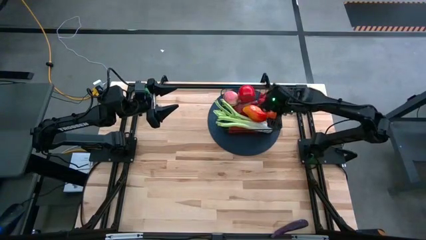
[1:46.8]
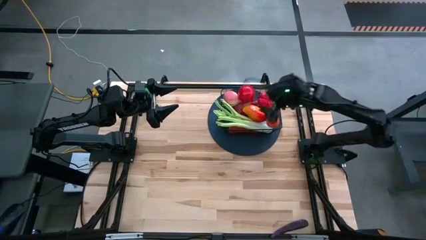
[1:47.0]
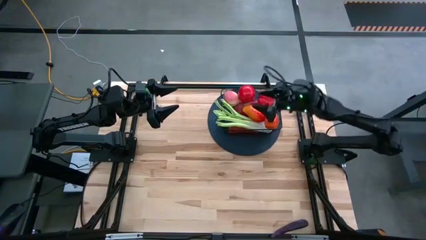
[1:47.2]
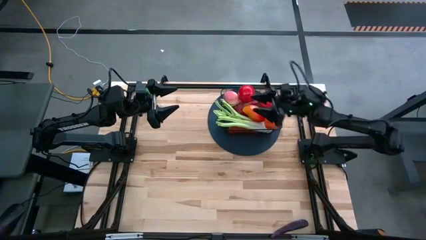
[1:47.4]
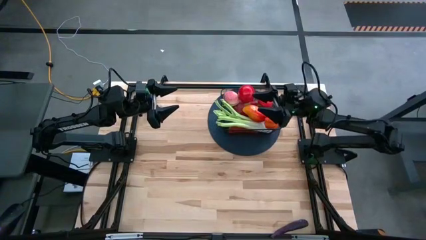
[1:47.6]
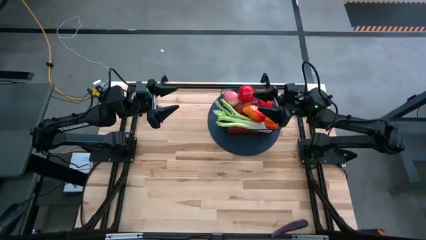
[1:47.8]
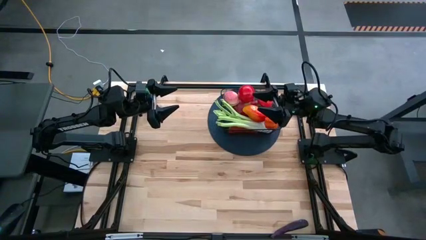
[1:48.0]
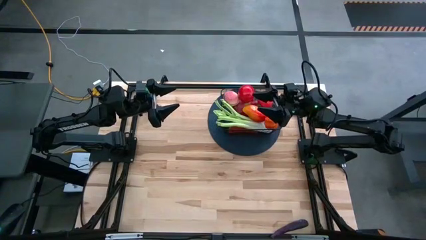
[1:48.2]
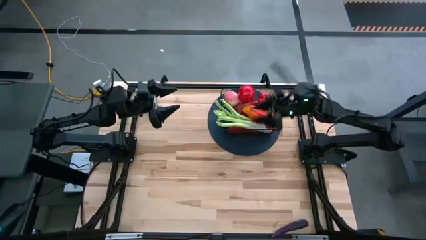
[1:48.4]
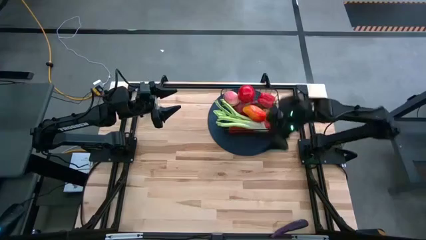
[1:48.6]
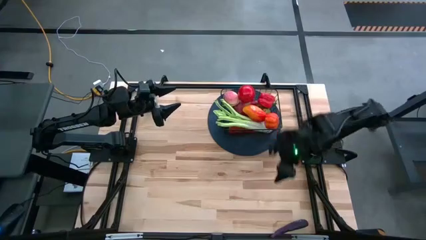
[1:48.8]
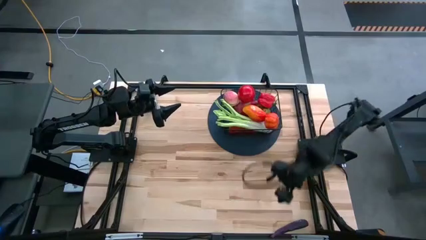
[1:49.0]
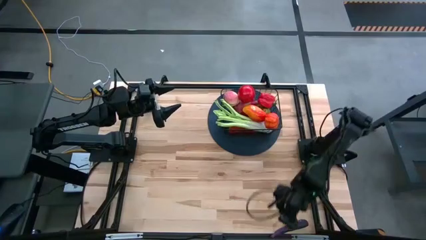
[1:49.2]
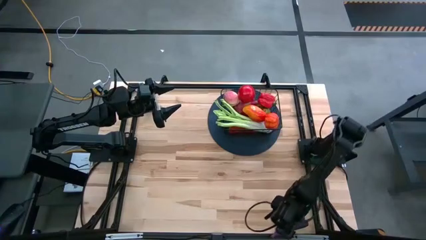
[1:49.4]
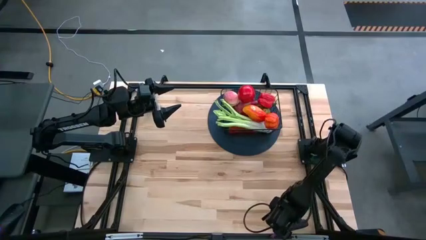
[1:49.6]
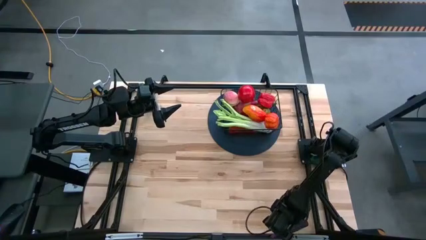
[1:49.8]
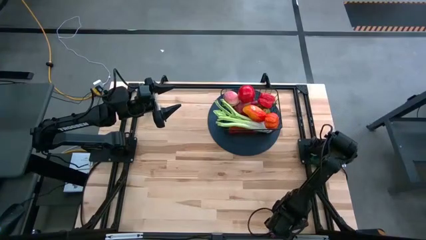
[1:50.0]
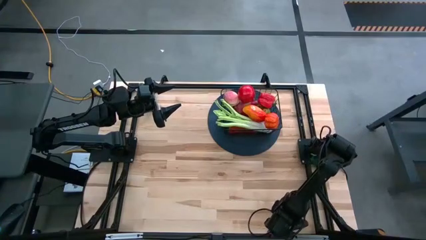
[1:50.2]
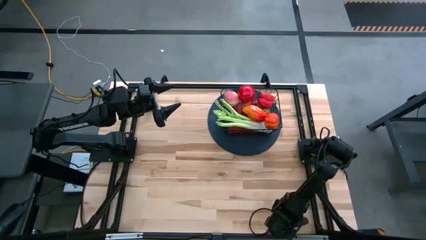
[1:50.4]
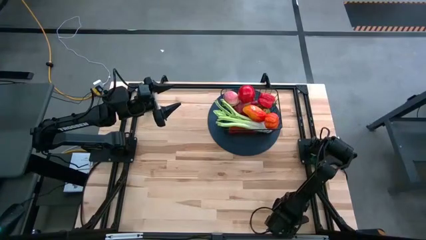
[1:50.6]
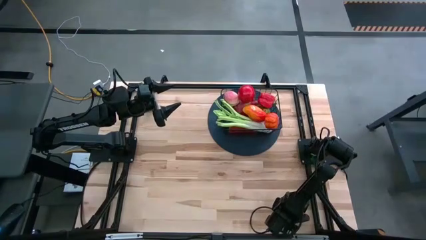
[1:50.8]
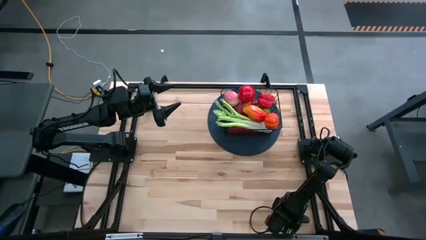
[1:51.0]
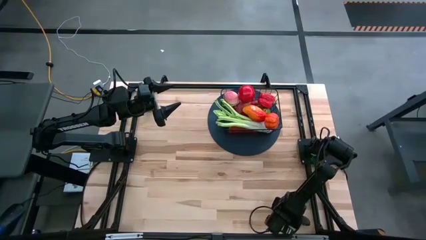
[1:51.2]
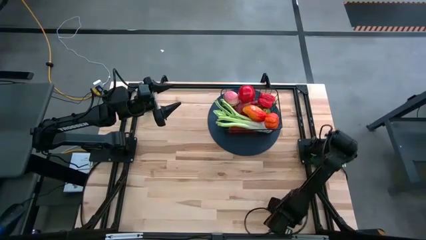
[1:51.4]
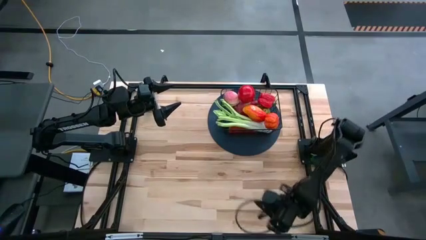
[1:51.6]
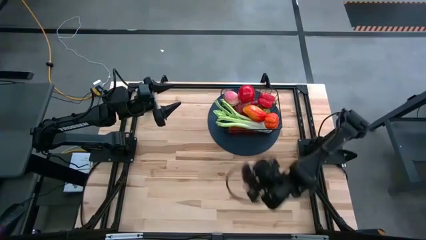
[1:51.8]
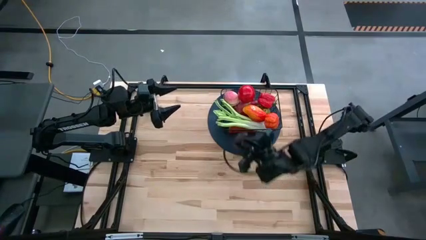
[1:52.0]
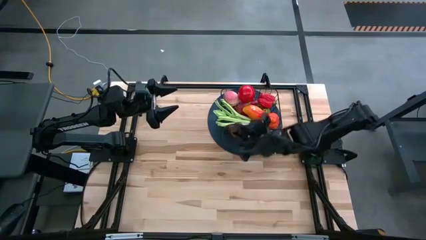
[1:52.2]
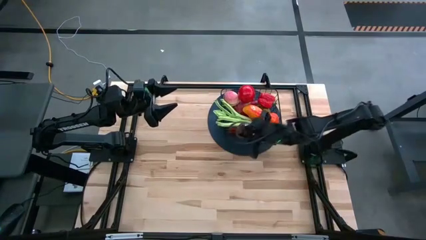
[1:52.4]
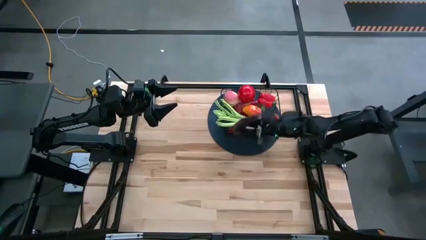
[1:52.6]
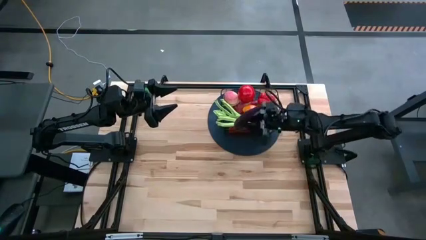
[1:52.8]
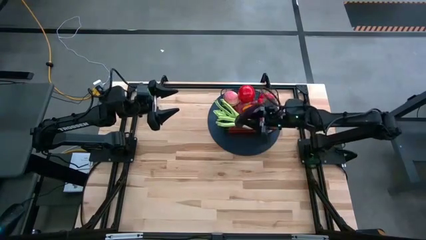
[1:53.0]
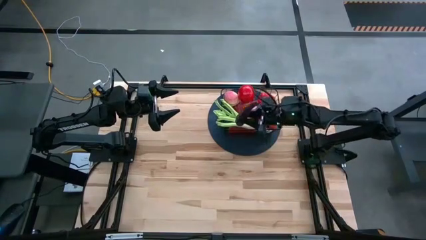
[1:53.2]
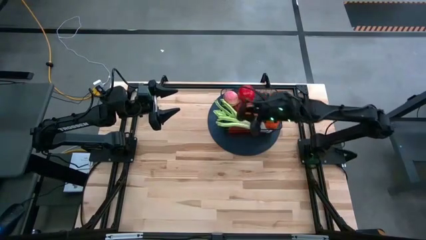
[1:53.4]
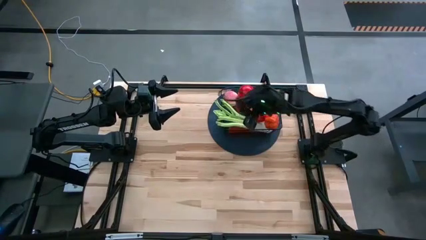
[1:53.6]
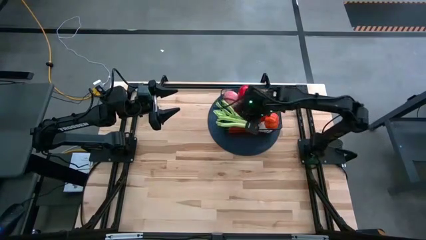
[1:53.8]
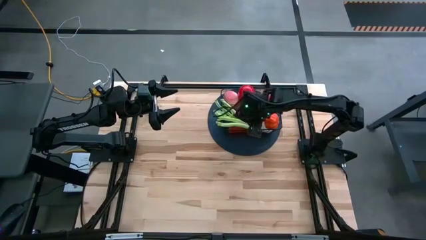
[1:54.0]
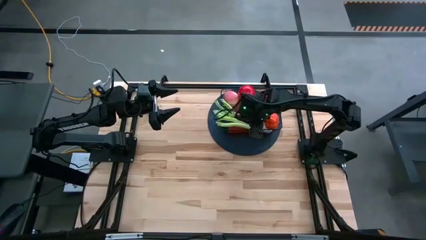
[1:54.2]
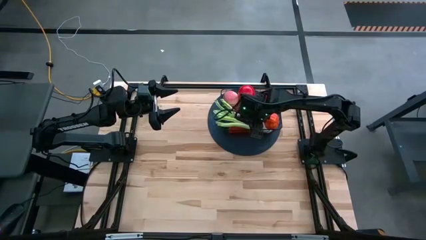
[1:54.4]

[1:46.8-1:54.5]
Task: Build produce basket
Put the eggplant into the black wire basket

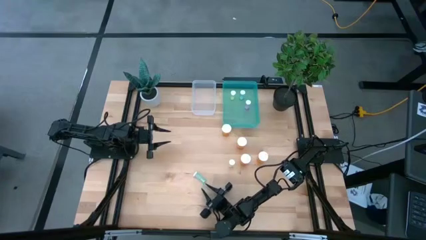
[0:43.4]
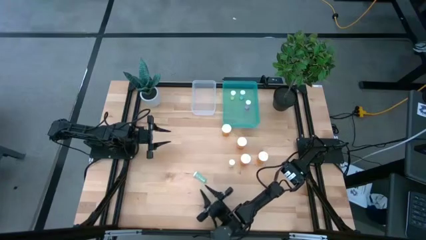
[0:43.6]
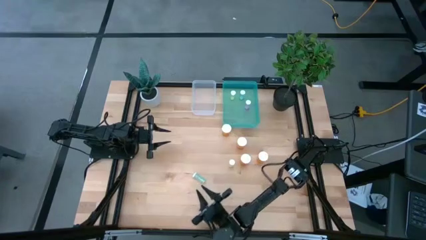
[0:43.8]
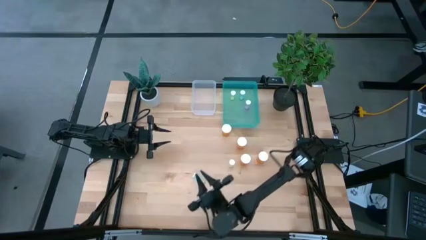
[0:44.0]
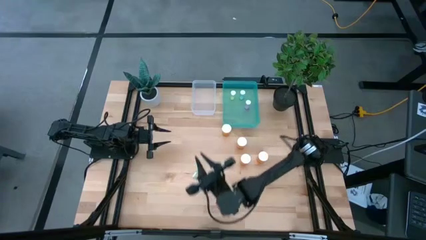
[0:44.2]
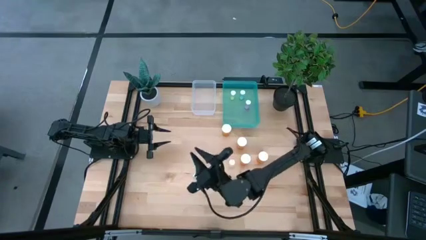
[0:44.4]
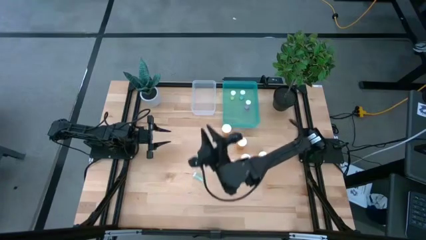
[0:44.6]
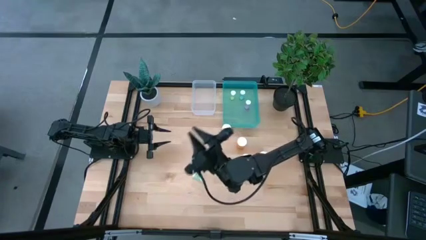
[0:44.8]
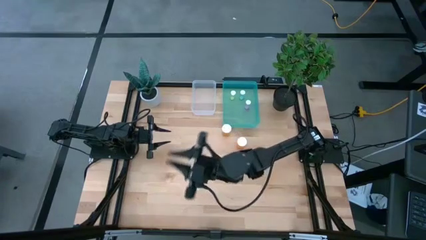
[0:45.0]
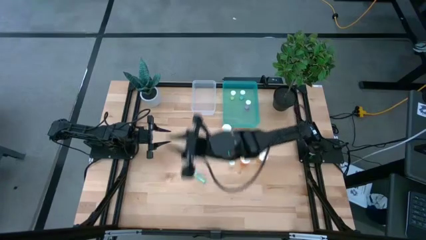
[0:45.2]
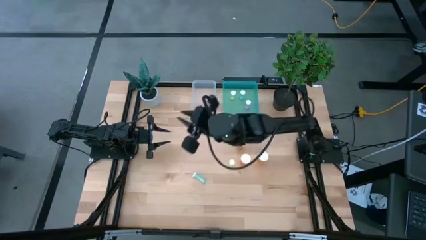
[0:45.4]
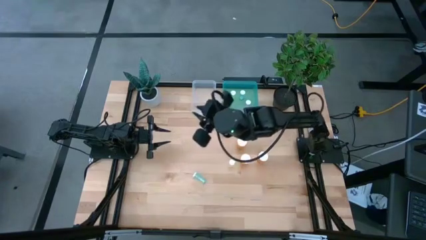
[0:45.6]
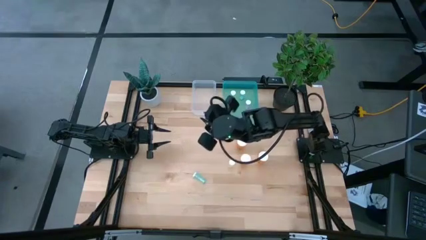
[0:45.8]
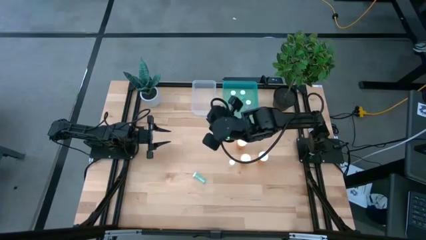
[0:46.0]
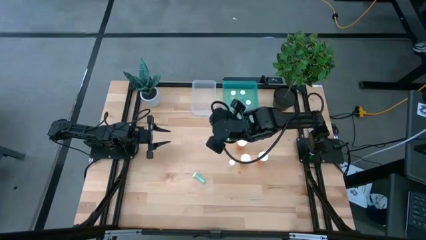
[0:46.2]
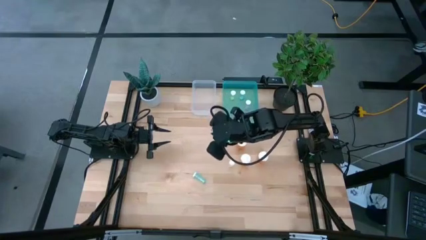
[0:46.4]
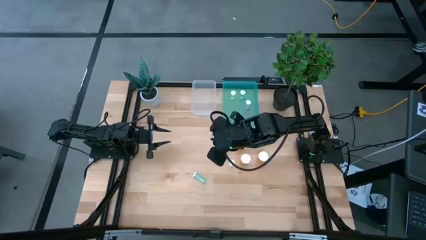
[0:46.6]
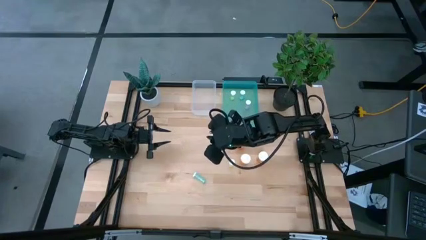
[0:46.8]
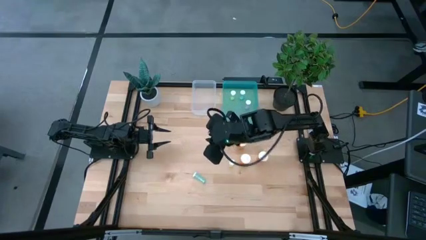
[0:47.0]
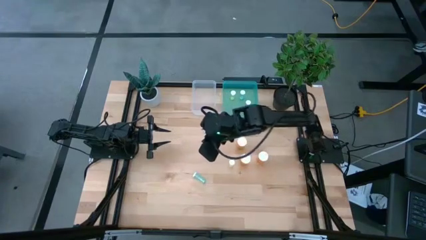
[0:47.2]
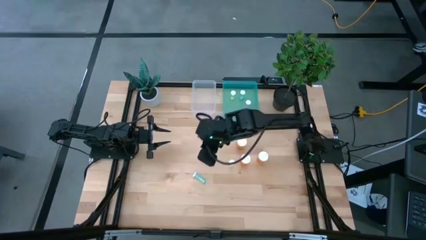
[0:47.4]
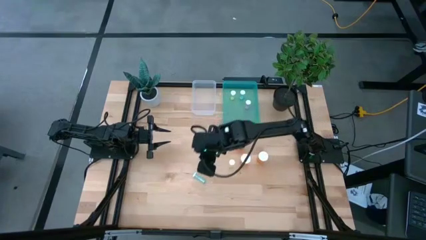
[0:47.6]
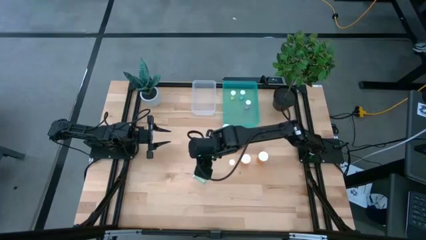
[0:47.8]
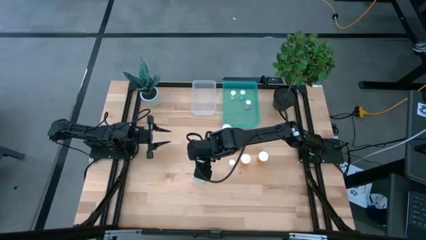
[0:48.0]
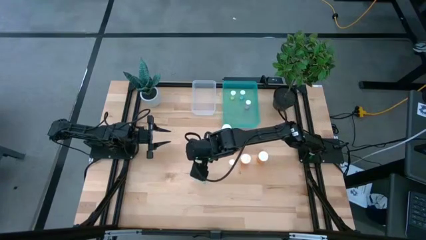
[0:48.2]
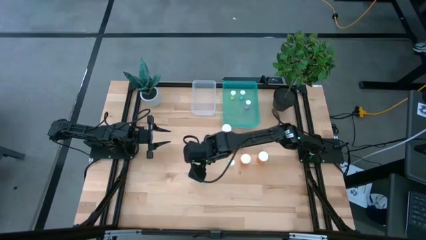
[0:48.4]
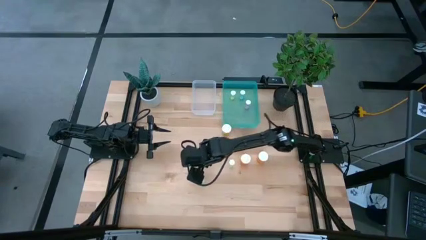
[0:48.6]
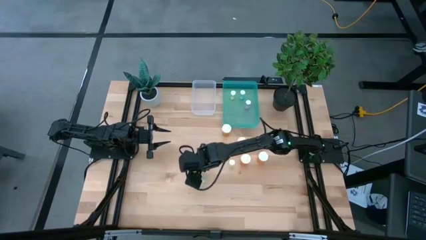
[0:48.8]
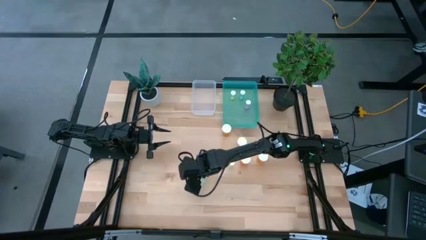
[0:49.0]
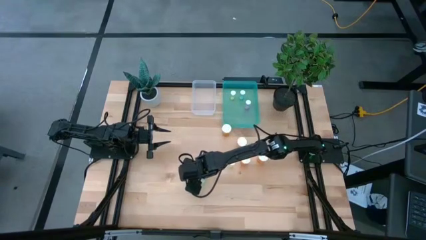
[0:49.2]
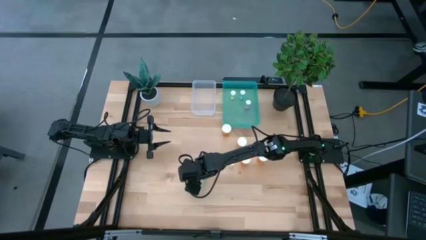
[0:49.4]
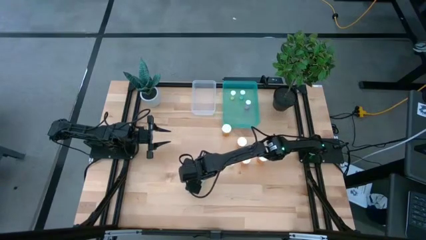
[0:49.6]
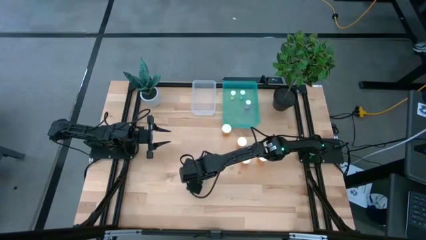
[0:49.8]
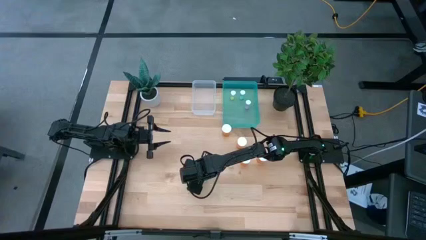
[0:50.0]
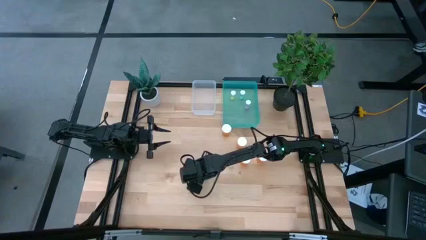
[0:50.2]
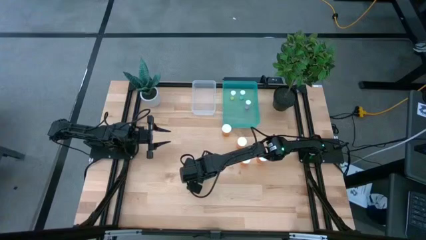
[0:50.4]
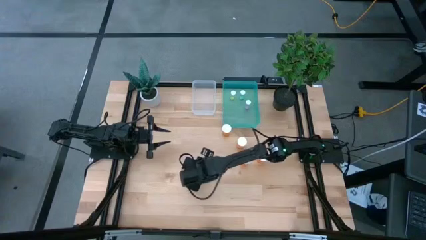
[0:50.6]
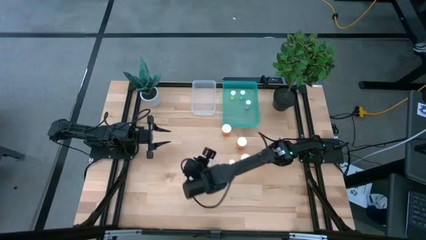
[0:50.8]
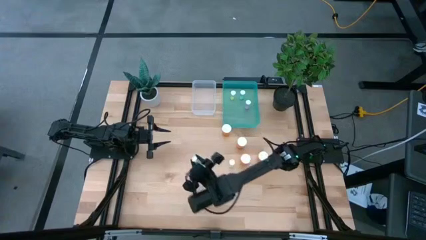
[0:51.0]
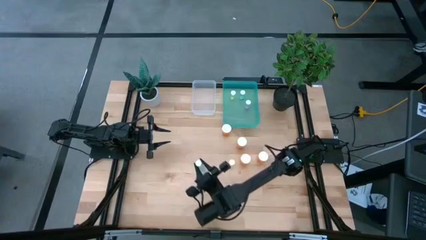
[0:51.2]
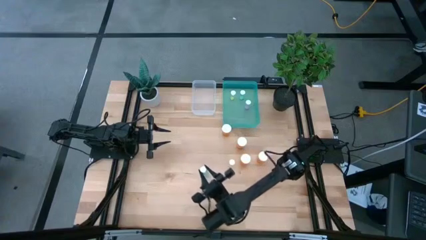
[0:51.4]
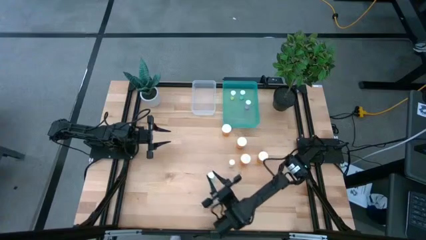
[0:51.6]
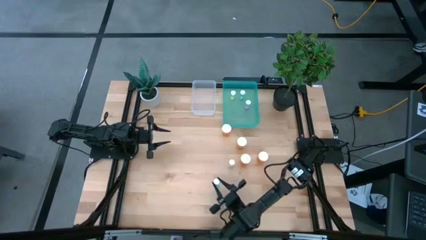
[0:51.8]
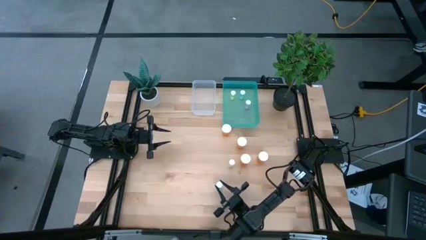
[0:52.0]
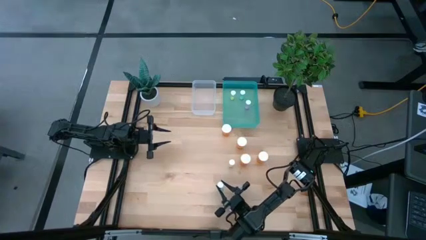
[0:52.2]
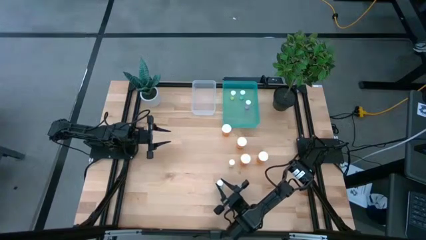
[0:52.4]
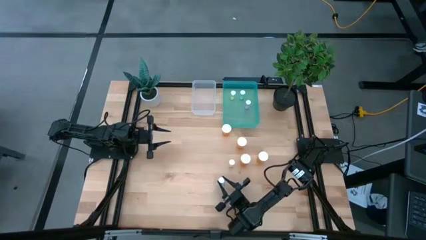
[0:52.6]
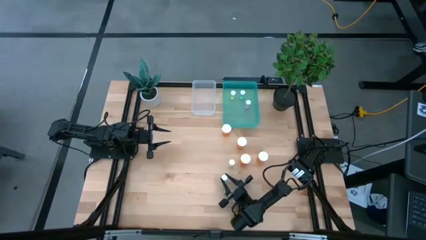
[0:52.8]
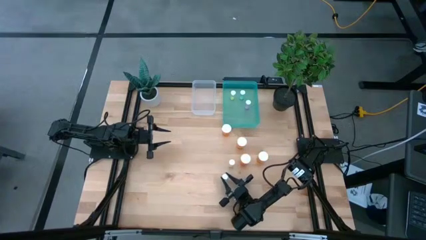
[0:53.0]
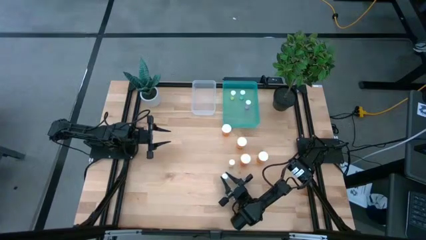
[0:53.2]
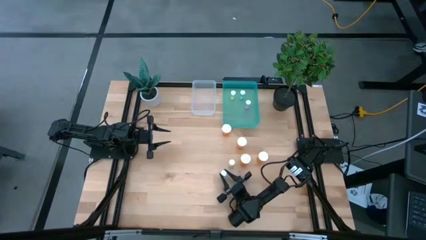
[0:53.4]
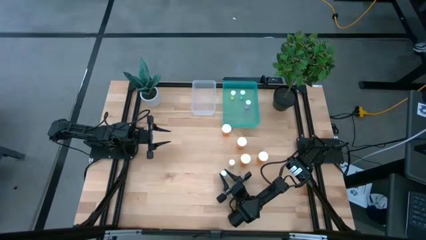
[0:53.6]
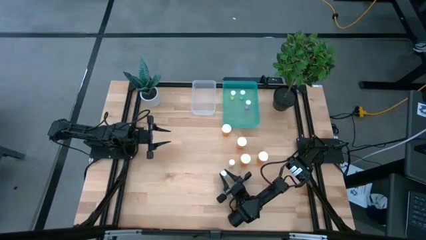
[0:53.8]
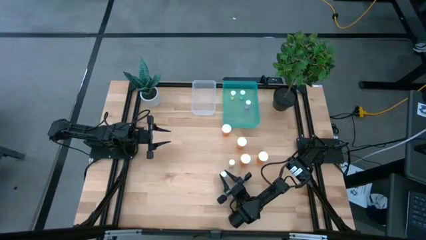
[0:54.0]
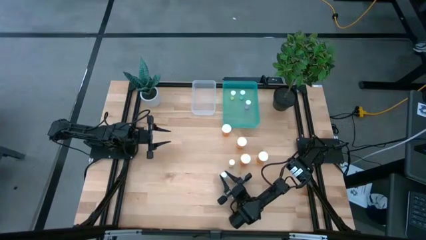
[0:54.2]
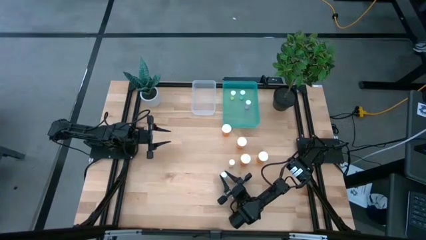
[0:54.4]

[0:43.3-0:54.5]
Task: Pick and place medicine bottles into bin by pill shape (circle, oval)
Put the blue tablet bottle into the blue bin
